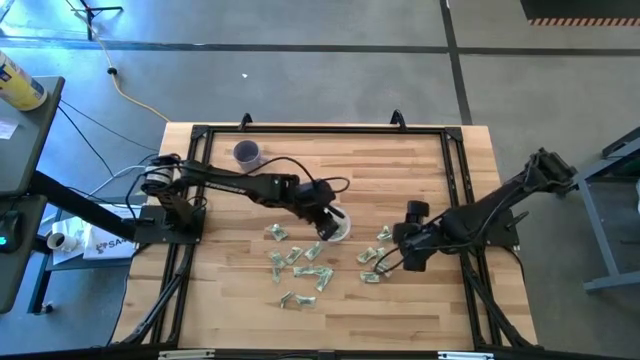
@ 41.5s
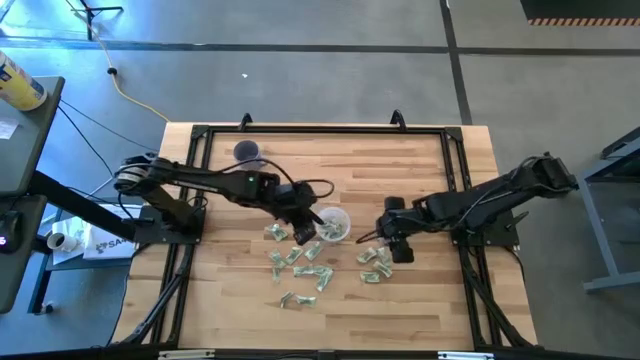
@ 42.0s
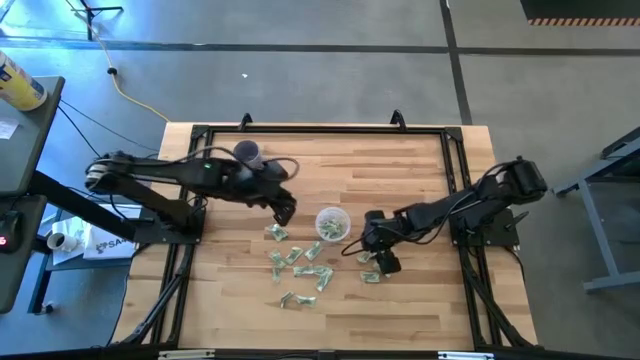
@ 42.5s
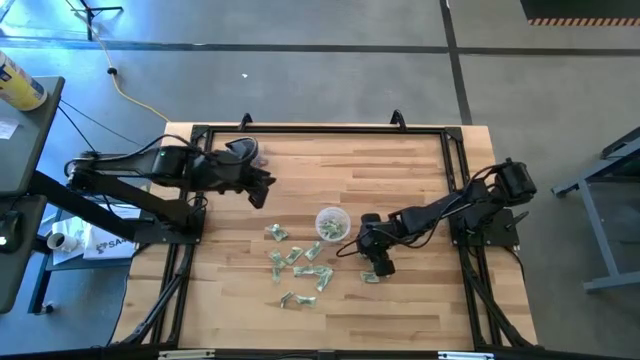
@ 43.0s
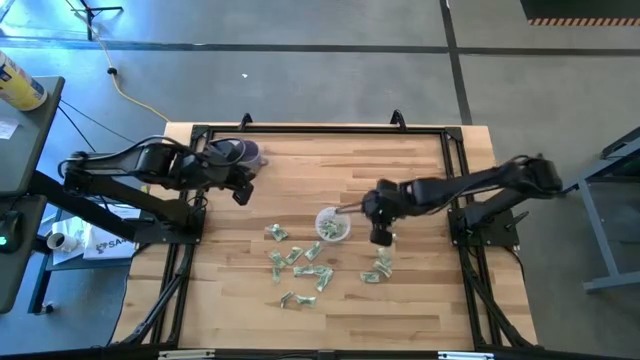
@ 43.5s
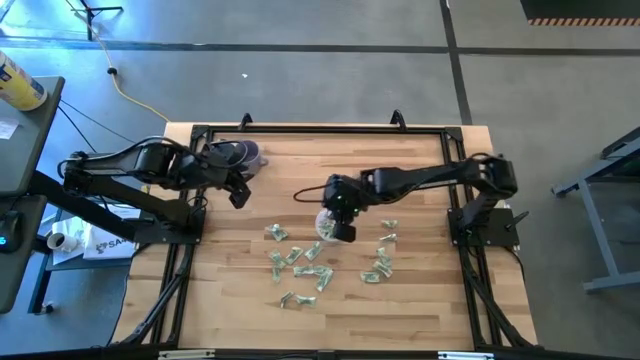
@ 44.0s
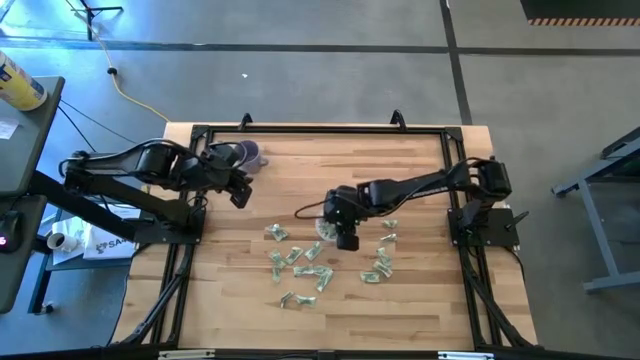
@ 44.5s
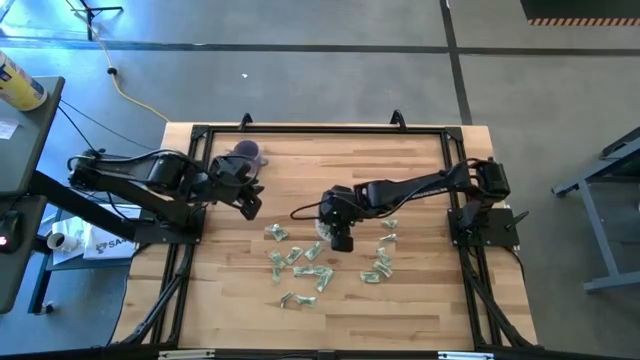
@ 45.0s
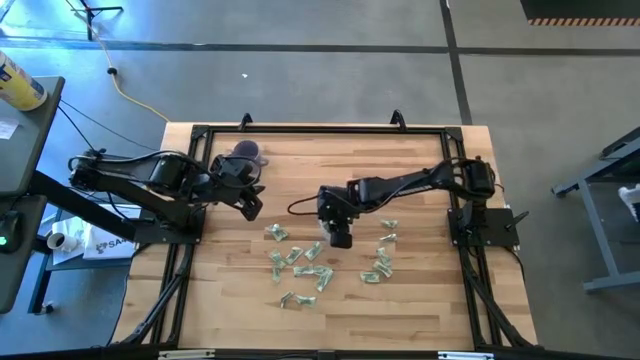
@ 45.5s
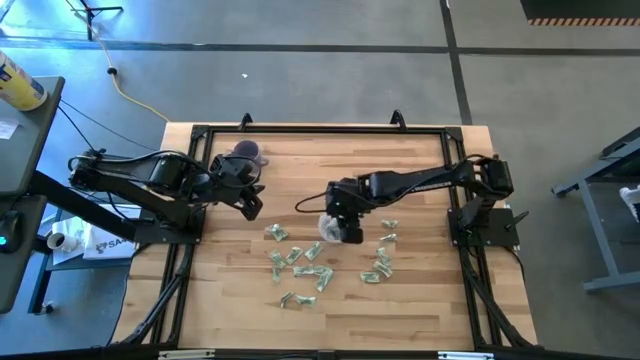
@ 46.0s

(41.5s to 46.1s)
Task: Pick and place Stevia / Truvia into bins
Put the stevia packet into the transparent container

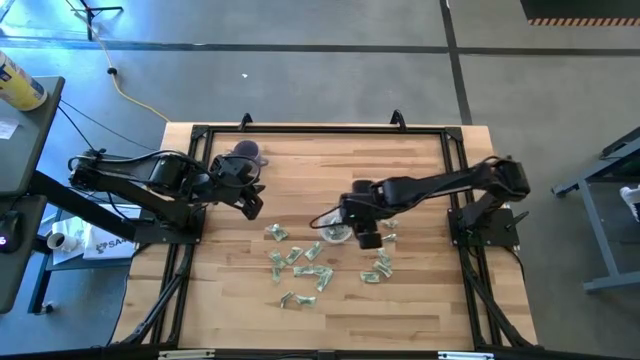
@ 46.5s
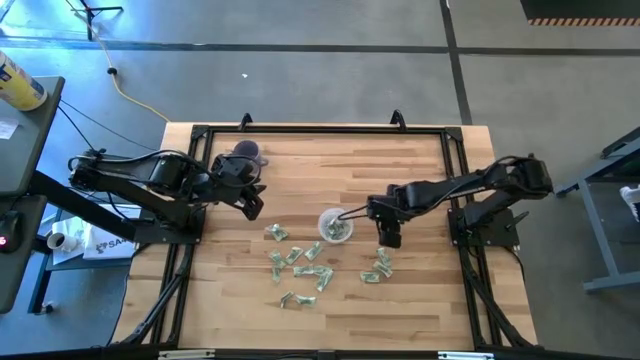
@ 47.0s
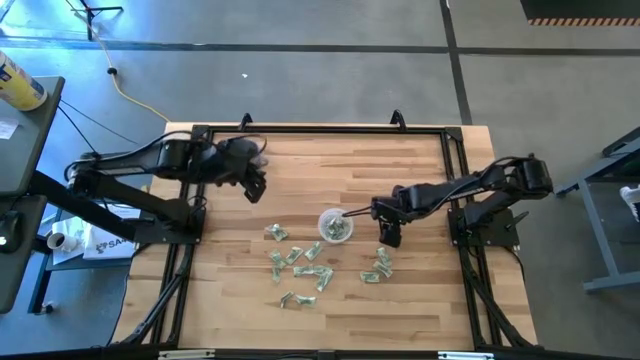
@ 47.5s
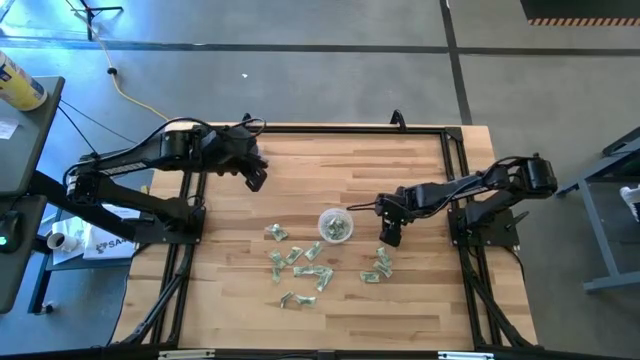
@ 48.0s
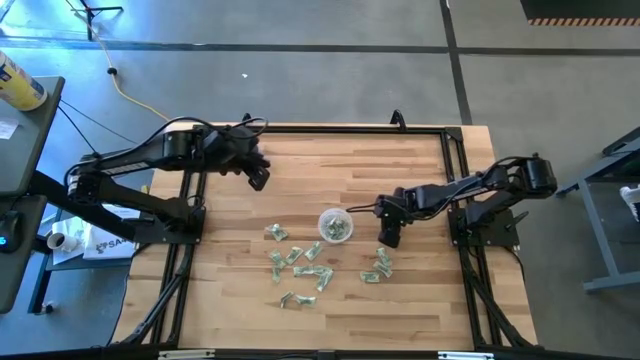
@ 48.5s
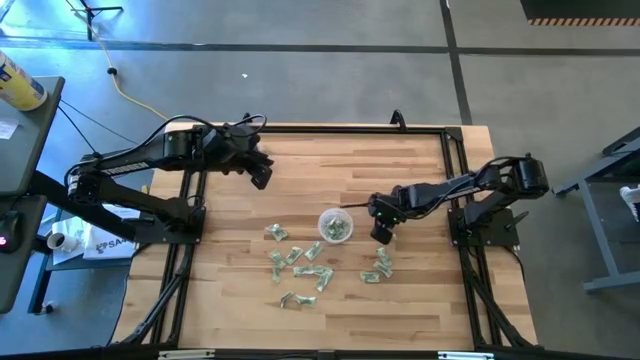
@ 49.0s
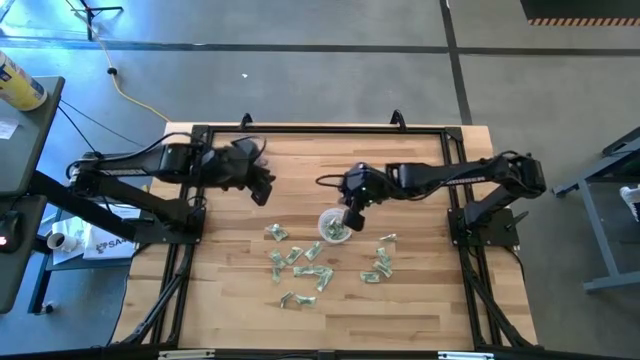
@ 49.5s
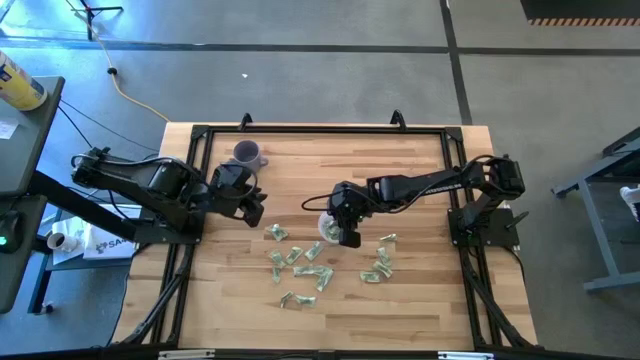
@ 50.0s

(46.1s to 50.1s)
Put the stevia packet into the transparent container

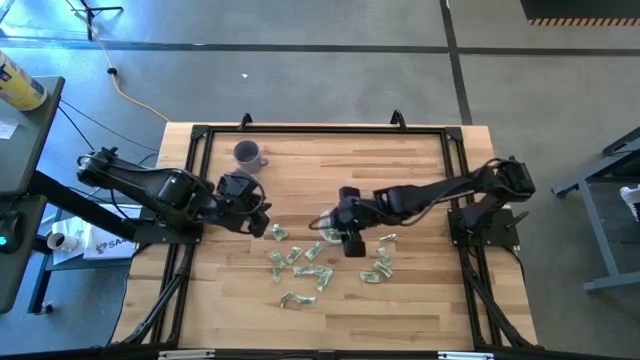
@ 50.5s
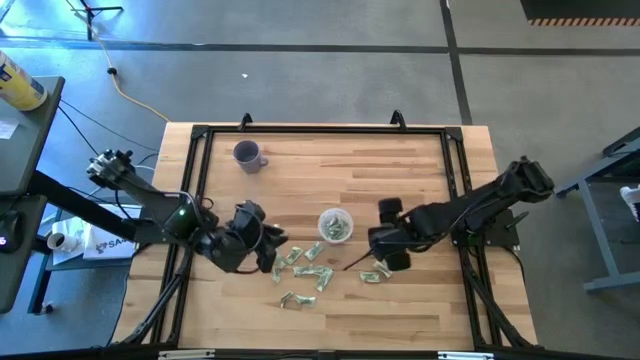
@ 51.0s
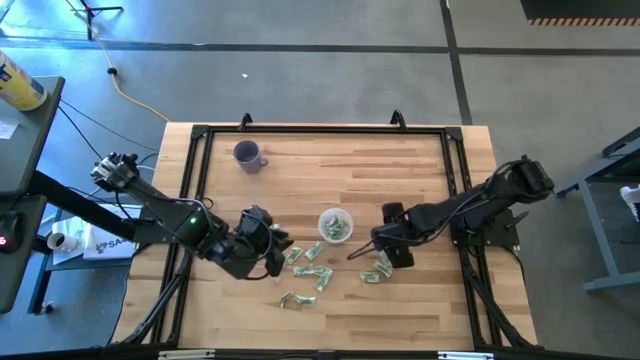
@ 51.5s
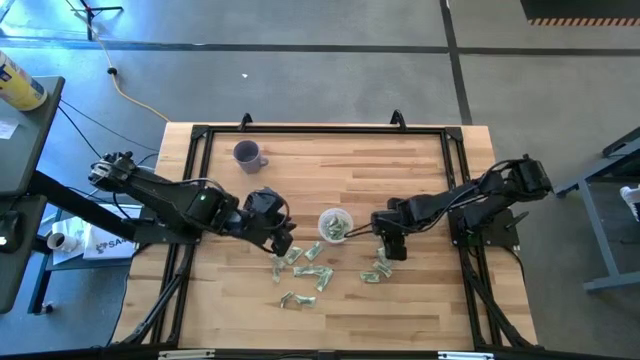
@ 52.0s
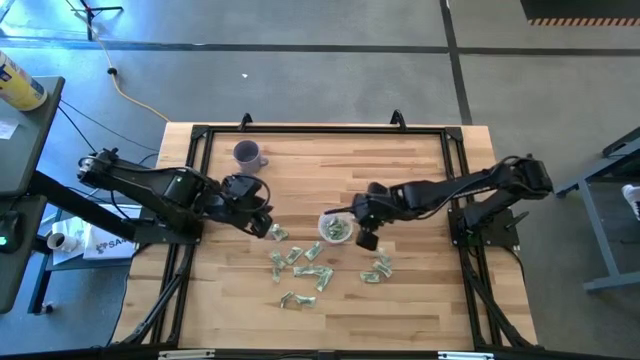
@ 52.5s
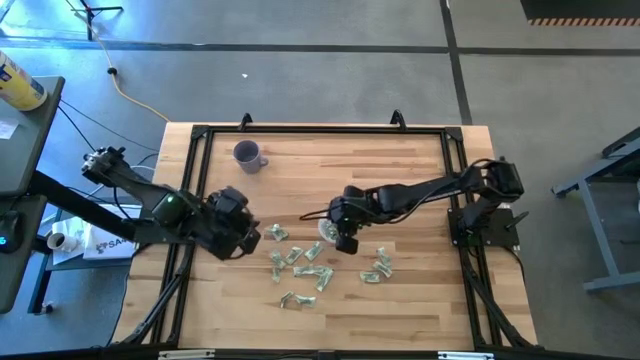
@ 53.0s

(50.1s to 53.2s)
Put the stevia packet into the transparent container

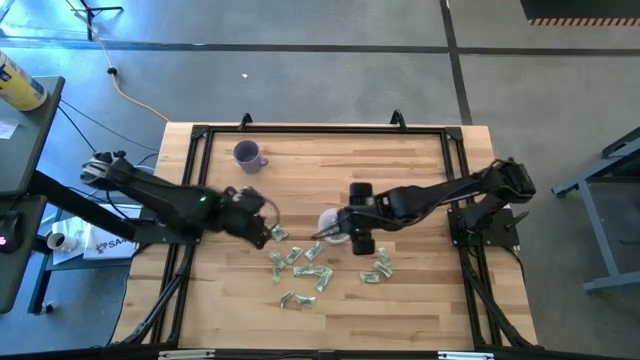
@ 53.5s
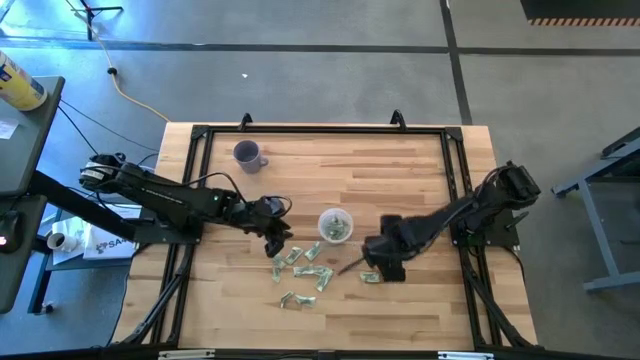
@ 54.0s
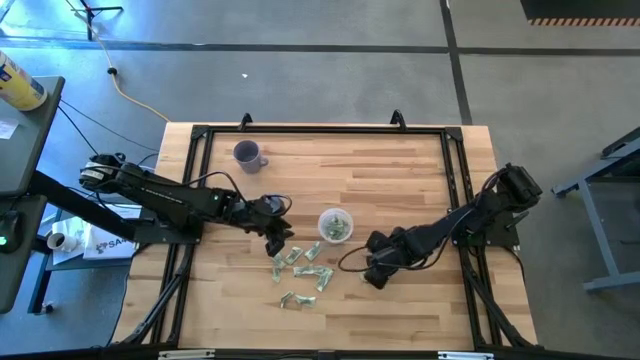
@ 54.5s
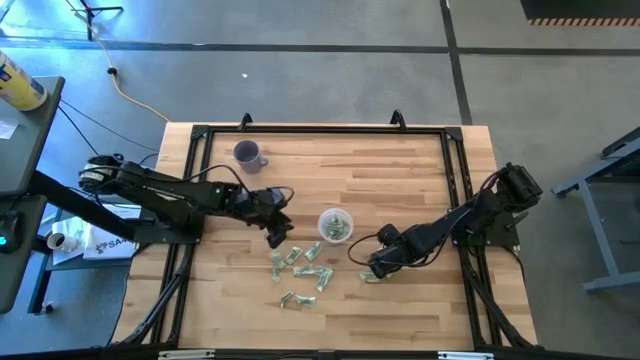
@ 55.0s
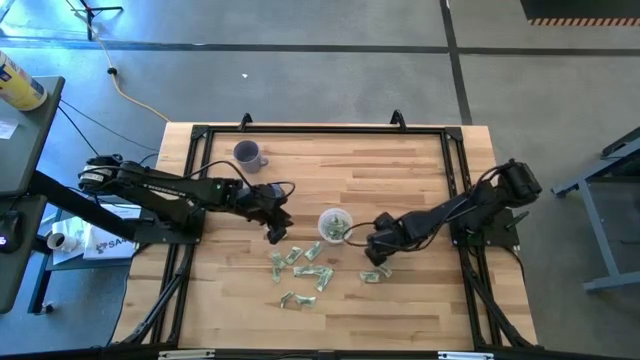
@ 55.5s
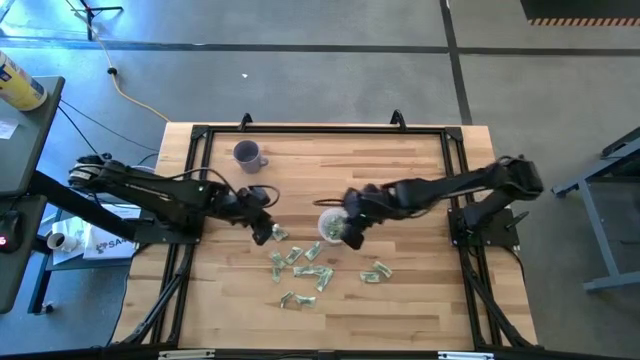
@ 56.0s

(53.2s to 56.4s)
Put the stevia packet into the transparent container

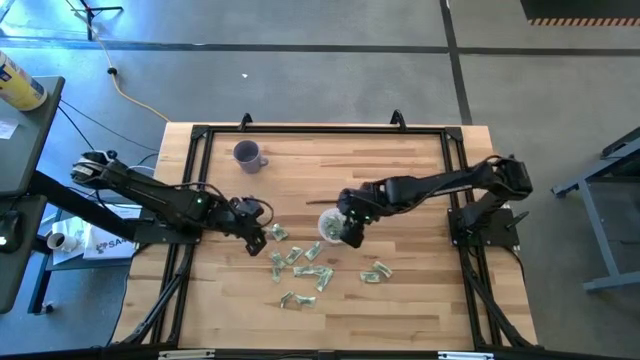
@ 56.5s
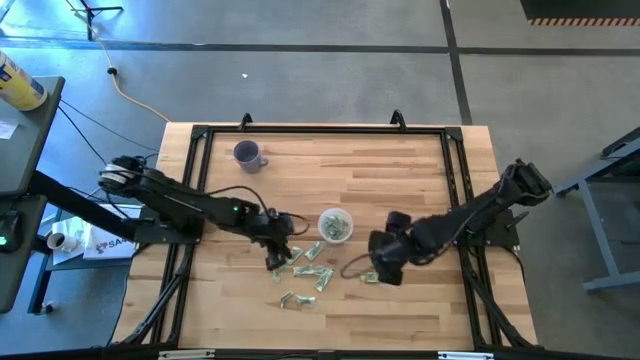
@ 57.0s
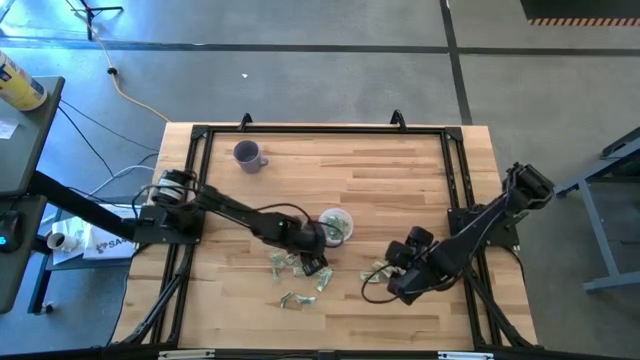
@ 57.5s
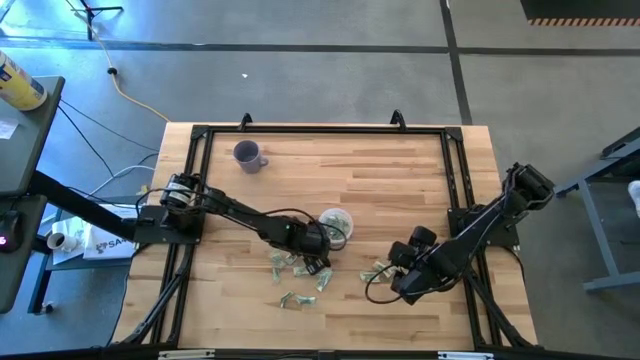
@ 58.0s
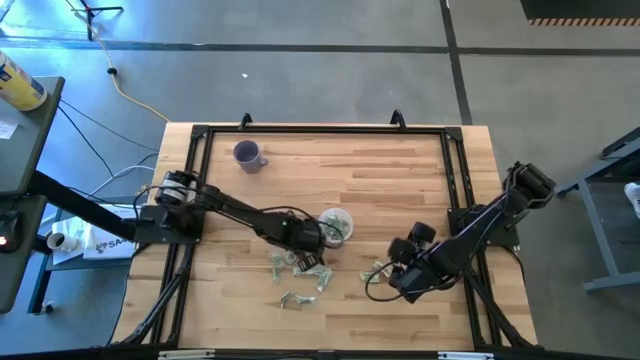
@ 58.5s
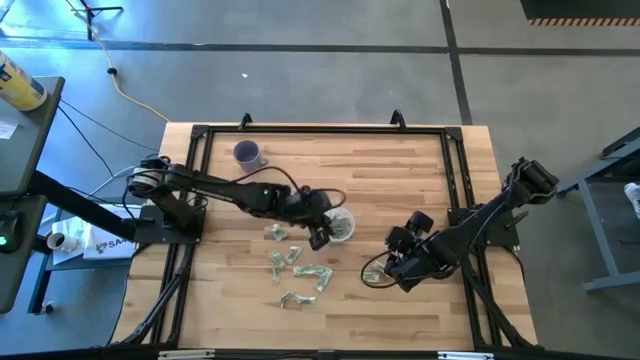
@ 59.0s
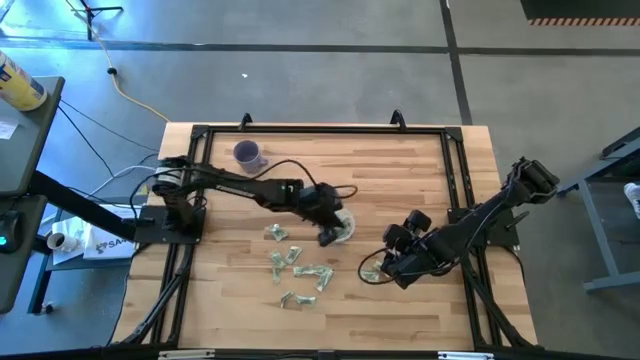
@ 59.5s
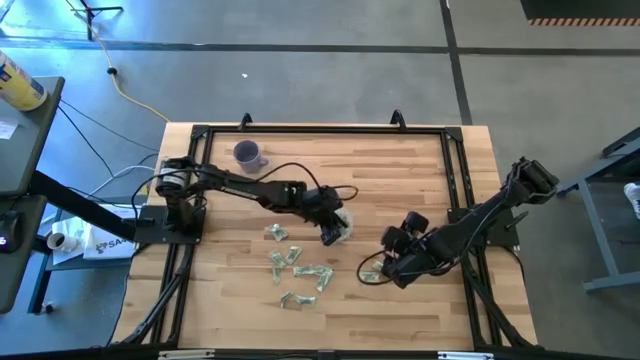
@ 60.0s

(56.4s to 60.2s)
Put the stevia packet into the transparent container

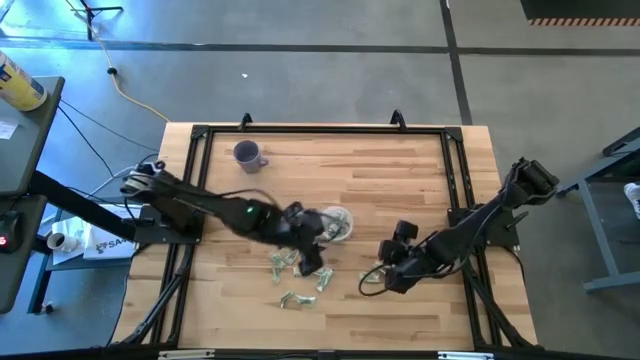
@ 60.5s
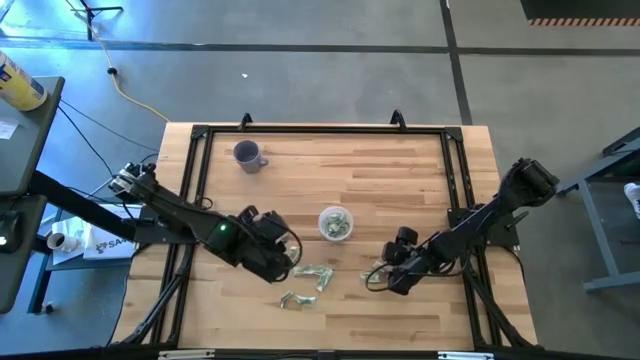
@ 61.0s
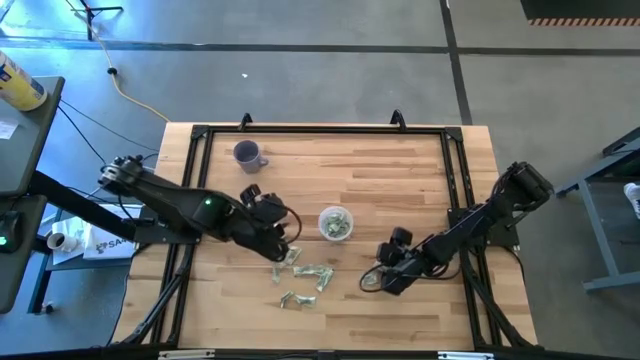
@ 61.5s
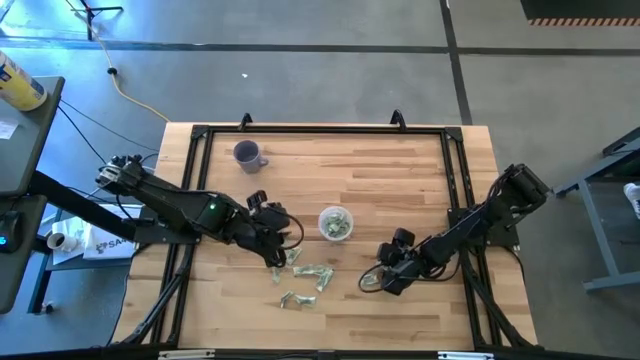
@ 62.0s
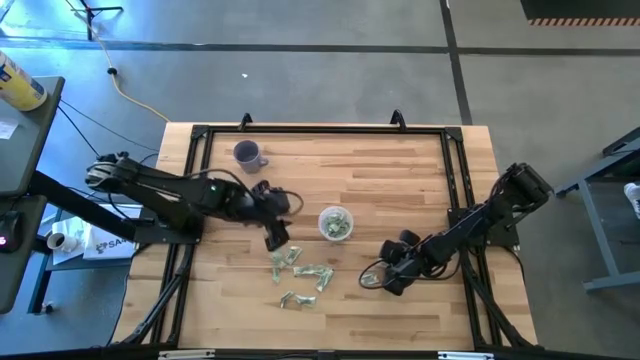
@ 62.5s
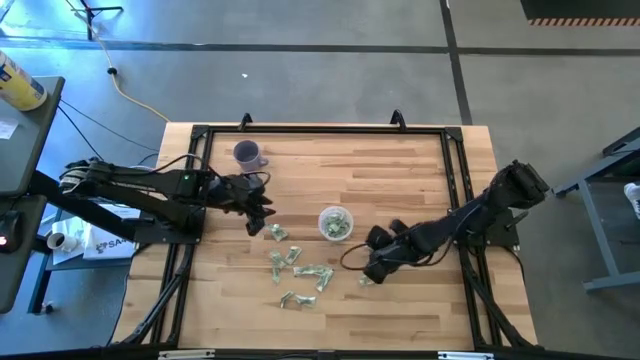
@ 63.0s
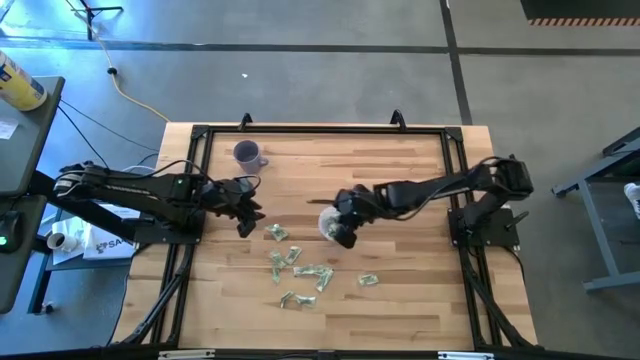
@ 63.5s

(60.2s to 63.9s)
Put the stevia packet into the transparent container
